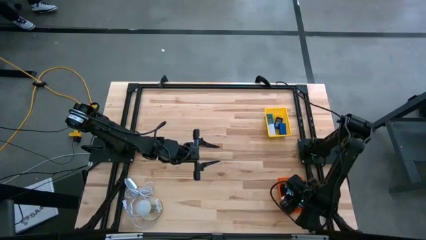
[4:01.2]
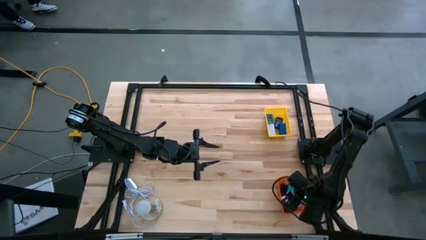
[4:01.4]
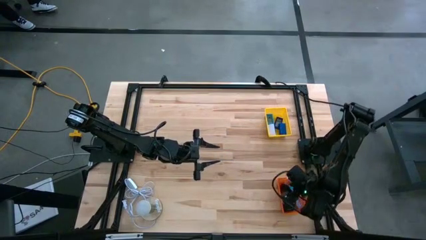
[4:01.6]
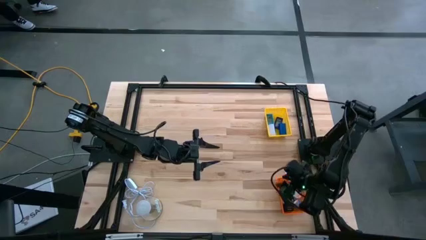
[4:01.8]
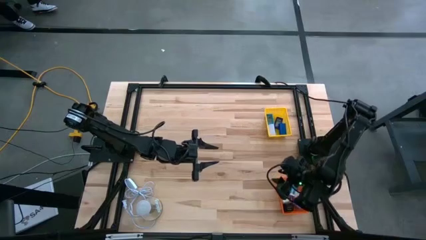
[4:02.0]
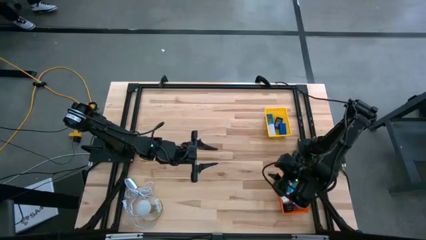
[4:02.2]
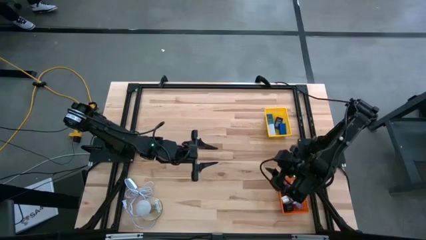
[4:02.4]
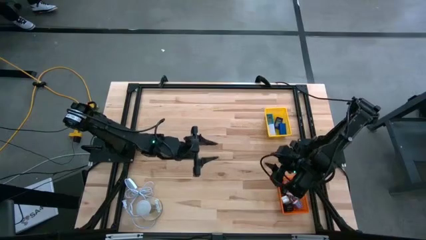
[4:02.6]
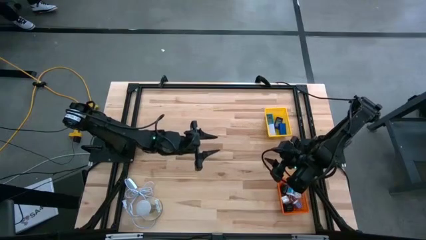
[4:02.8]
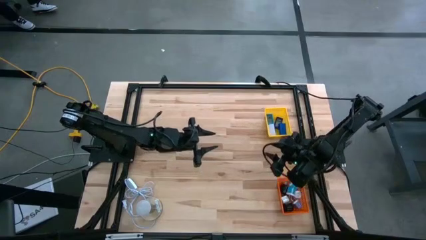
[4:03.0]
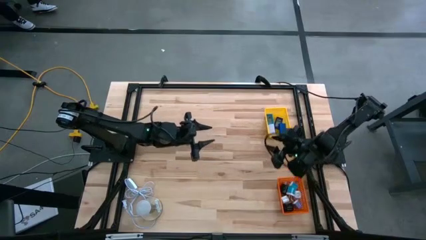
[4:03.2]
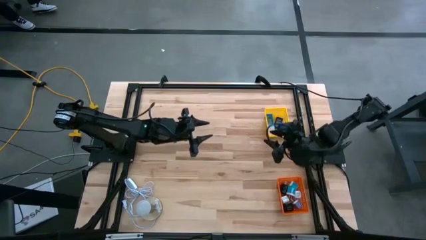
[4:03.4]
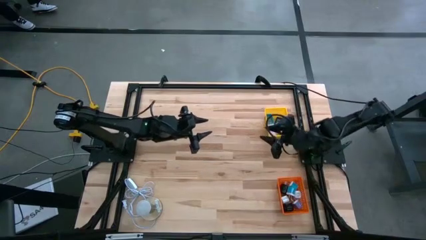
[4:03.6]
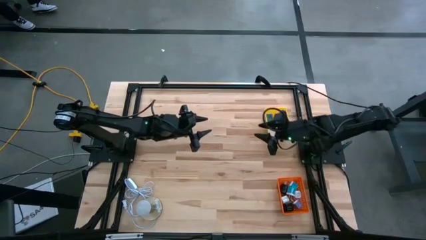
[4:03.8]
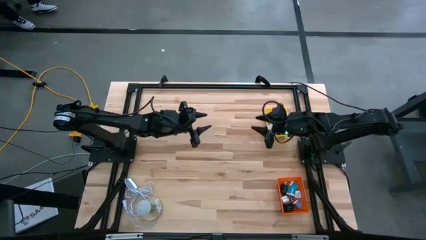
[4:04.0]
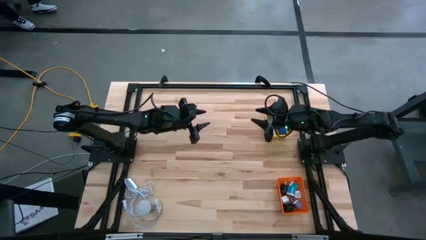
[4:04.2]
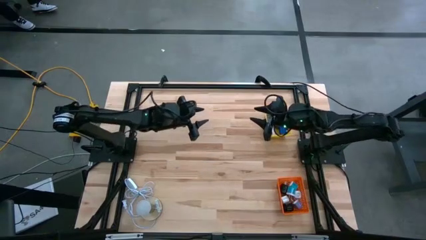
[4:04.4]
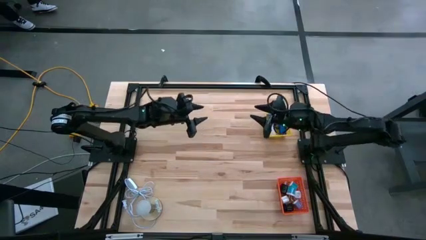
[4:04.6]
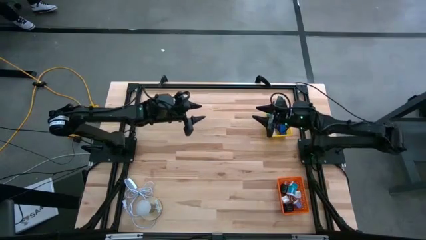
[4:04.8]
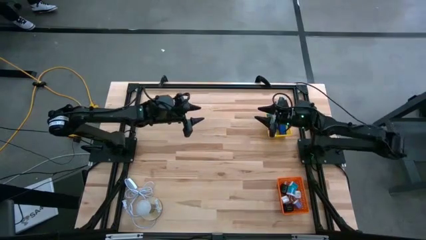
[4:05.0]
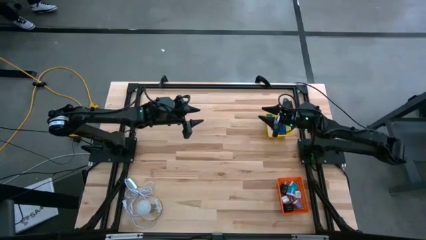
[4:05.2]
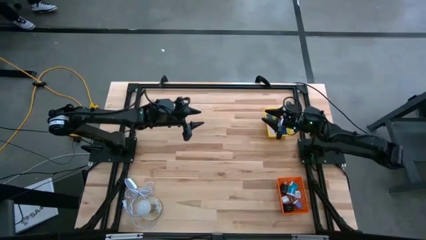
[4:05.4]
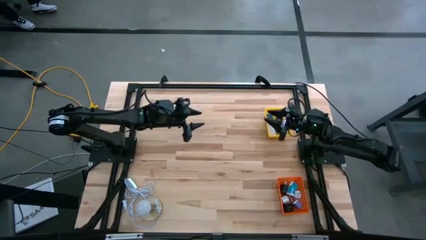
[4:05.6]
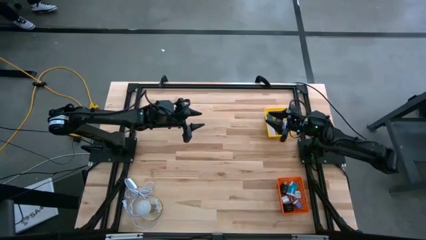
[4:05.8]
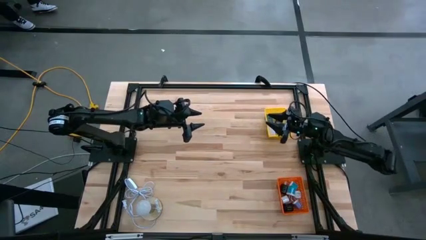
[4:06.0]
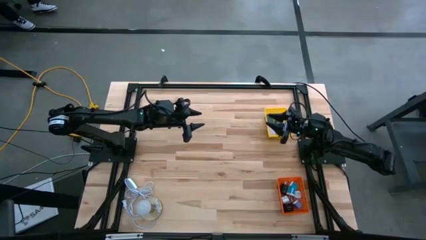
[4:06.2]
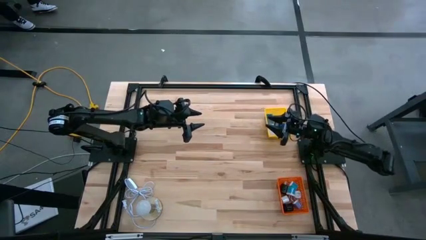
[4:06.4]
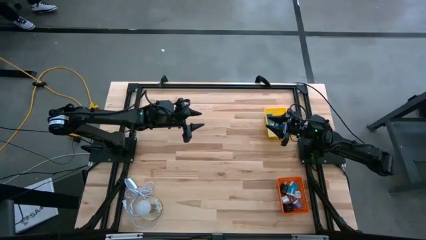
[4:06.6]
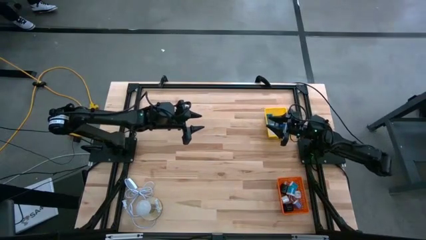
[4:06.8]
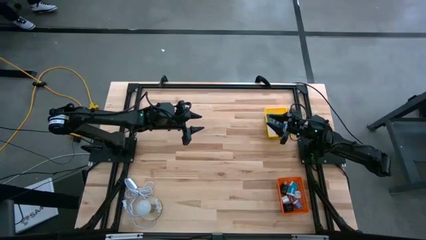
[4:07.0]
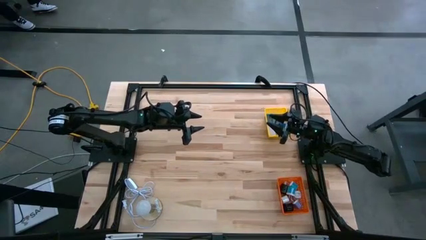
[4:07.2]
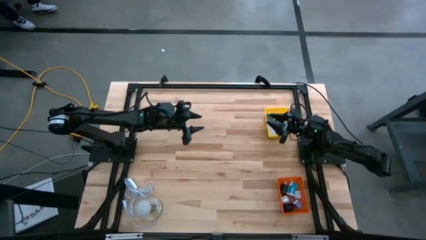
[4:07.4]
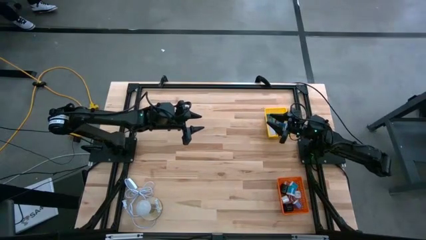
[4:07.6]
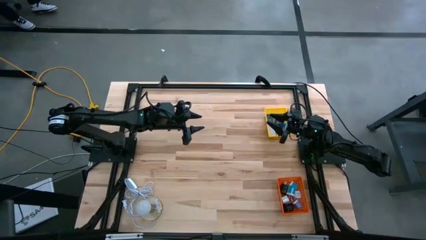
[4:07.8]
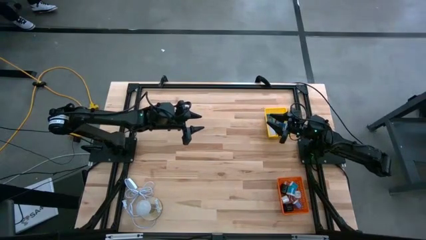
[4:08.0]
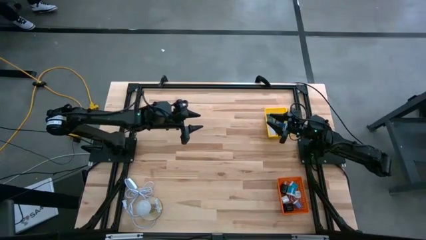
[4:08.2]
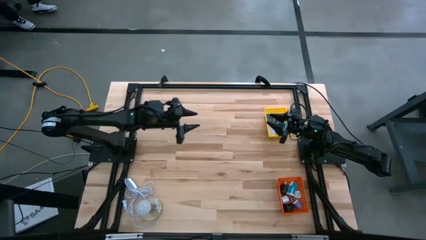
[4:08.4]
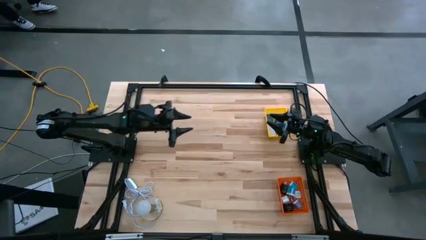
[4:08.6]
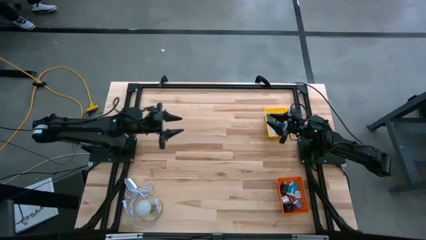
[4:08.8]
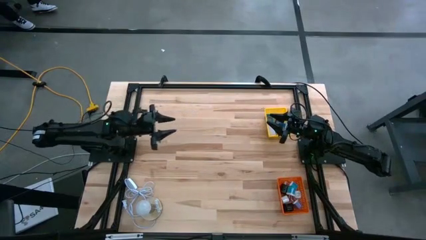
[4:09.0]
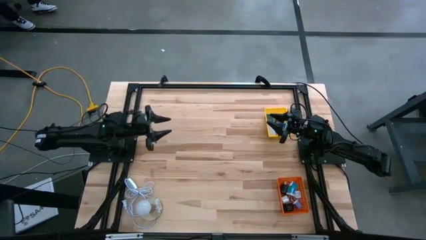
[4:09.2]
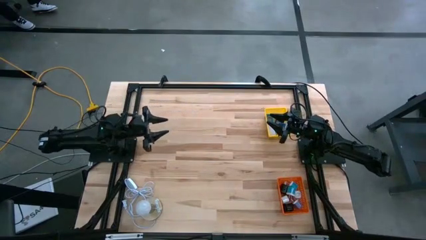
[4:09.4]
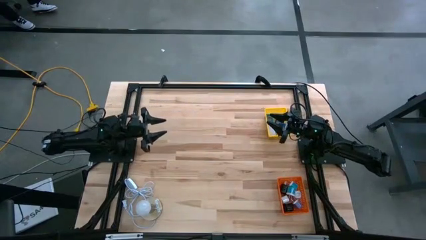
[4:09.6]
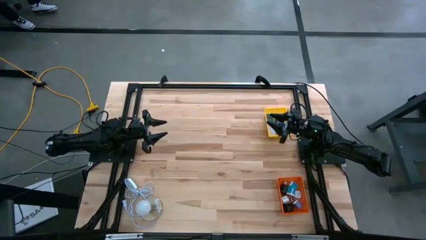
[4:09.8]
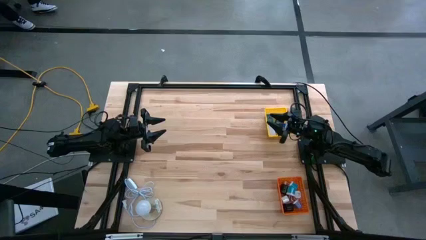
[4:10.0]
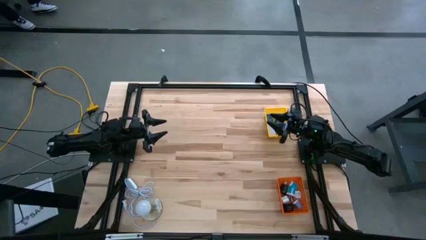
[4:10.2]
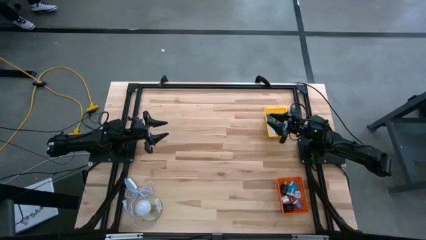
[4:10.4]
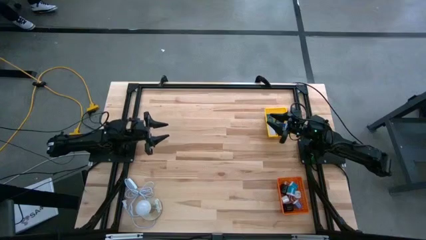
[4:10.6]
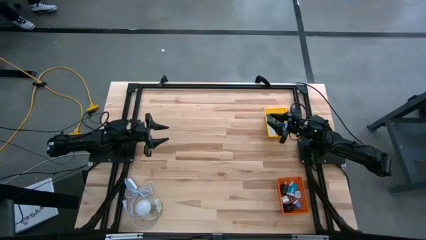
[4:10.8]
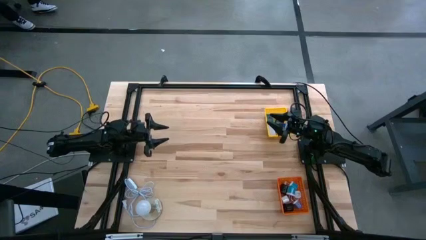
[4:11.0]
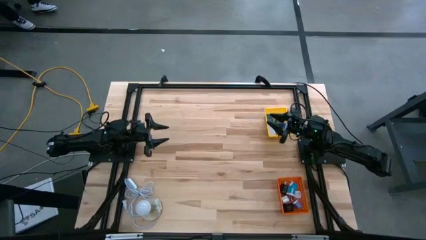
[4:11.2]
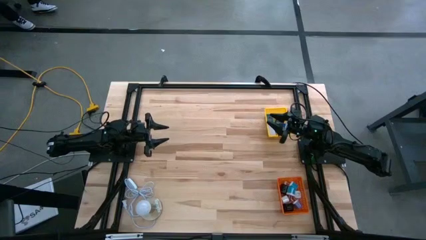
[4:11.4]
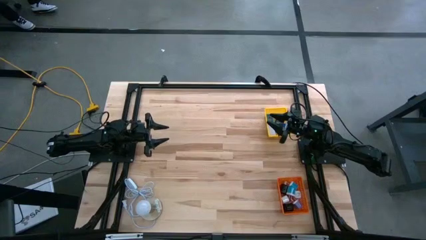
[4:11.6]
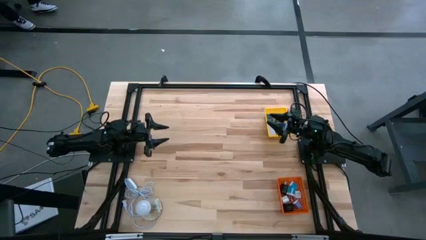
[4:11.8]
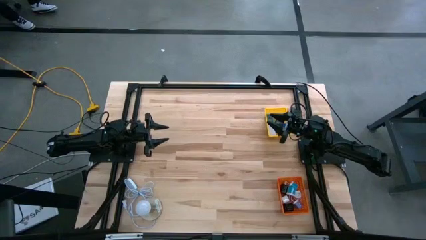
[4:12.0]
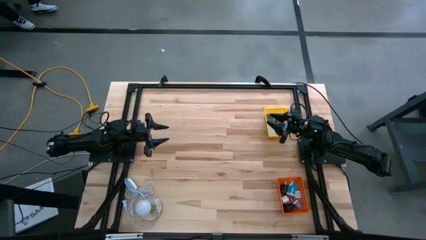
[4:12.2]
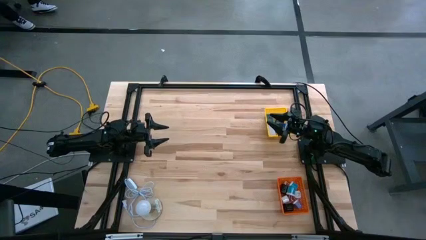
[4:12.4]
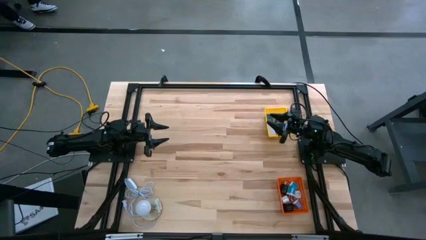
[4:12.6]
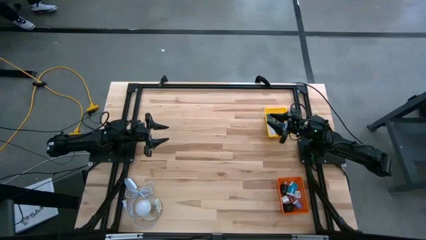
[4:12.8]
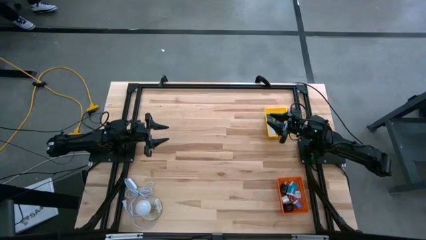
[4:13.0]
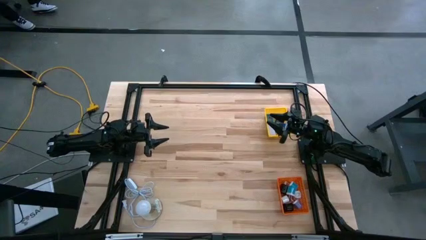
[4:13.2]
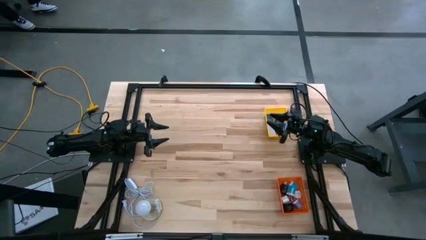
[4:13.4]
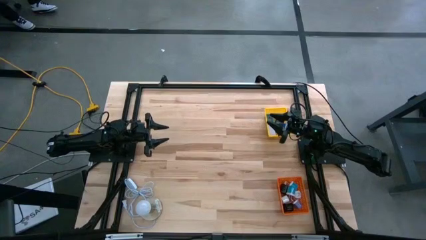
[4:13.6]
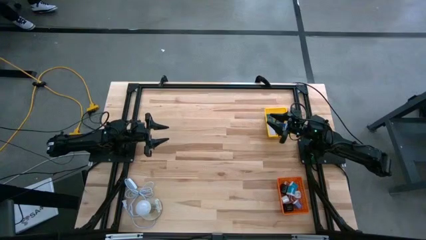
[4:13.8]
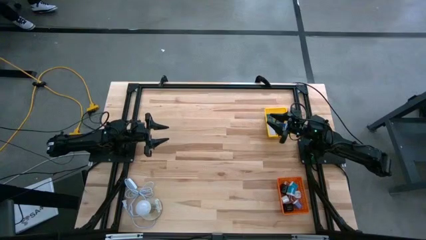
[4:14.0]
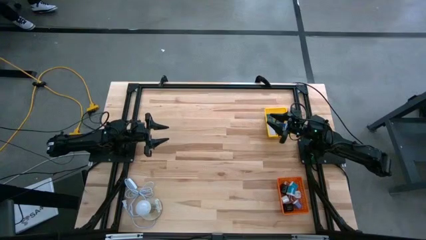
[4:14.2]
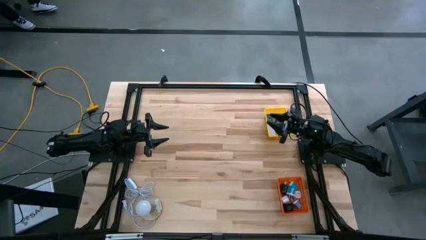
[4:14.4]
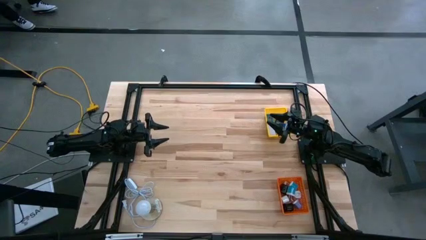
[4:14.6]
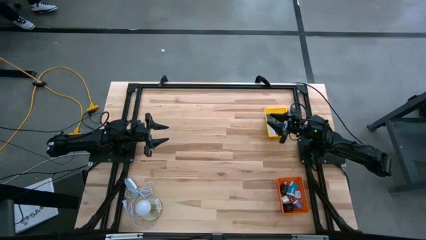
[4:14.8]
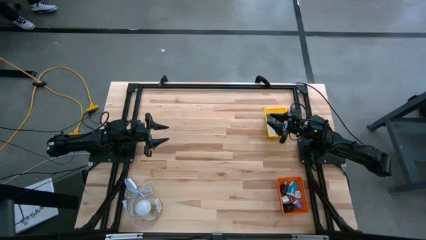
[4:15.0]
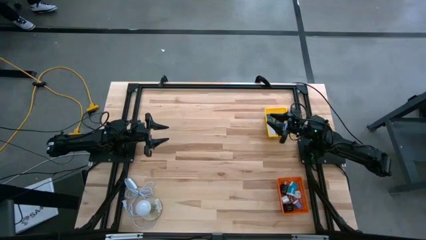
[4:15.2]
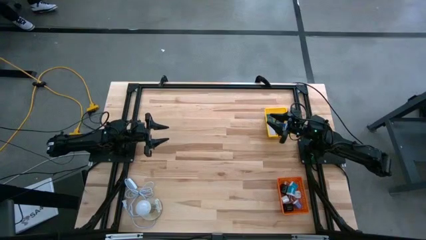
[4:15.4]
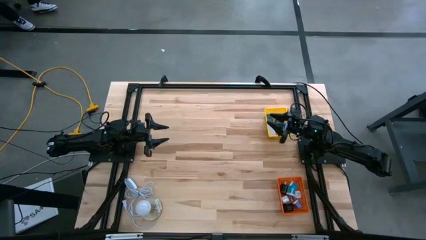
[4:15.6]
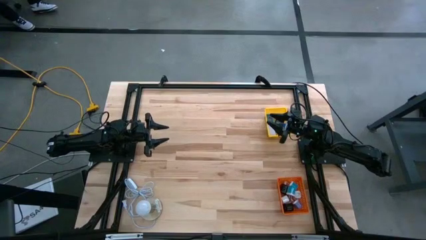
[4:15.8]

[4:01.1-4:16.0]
Task: Pick & Place Office items
Return to Home position

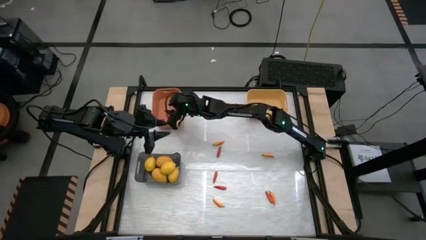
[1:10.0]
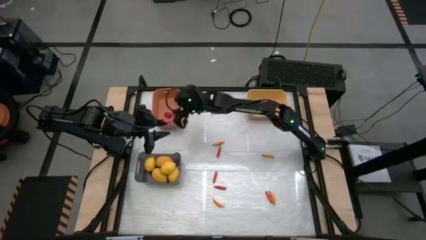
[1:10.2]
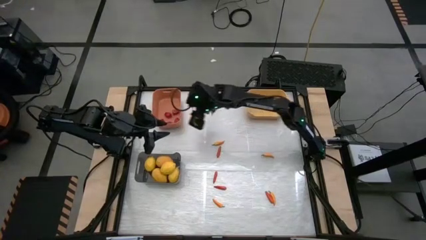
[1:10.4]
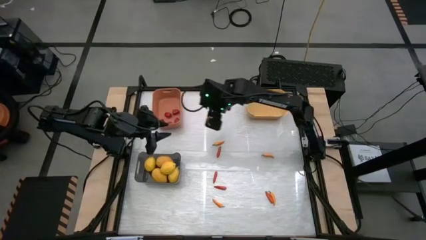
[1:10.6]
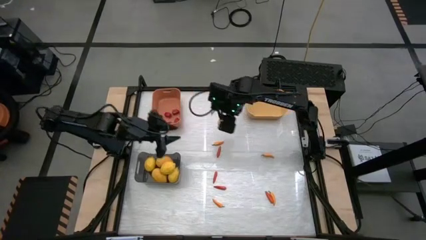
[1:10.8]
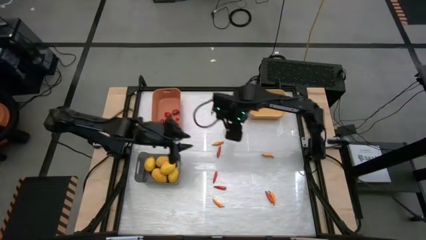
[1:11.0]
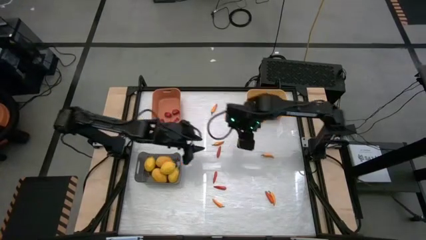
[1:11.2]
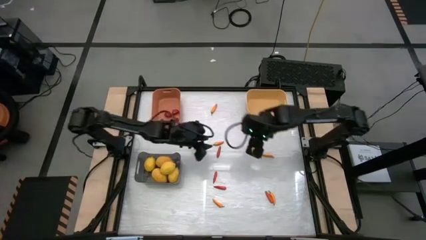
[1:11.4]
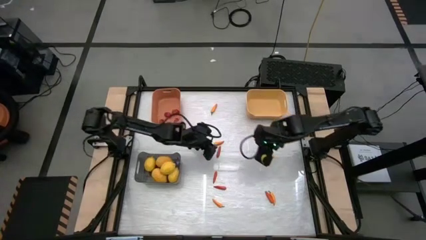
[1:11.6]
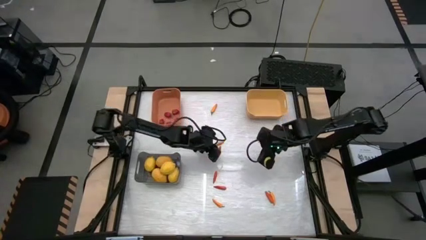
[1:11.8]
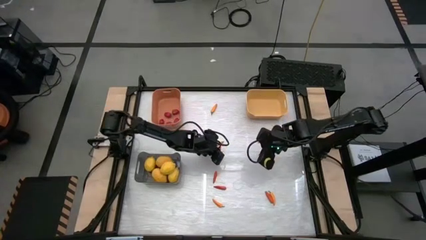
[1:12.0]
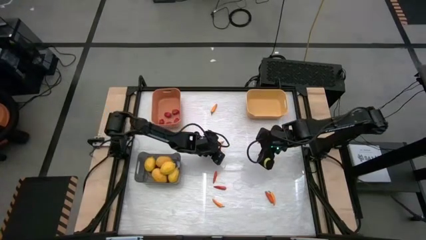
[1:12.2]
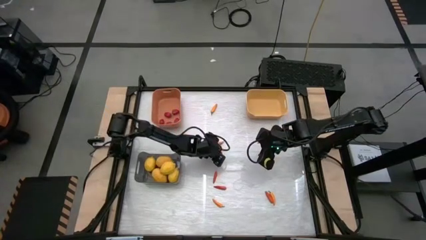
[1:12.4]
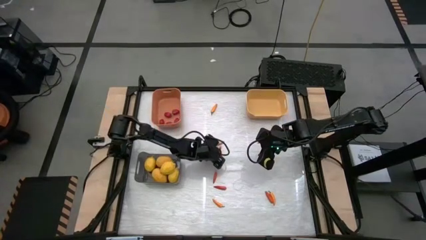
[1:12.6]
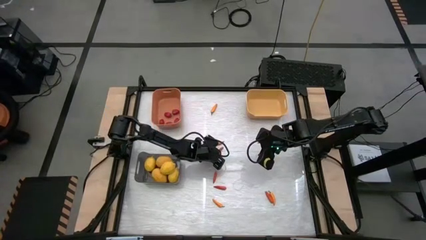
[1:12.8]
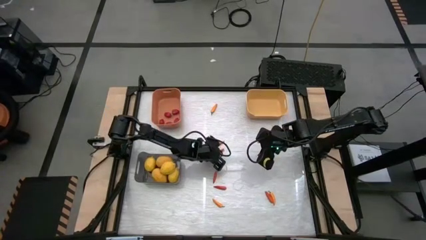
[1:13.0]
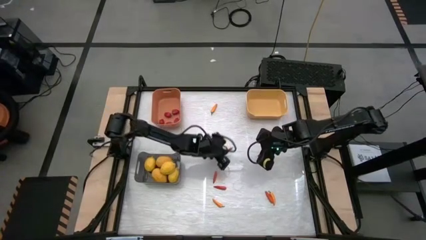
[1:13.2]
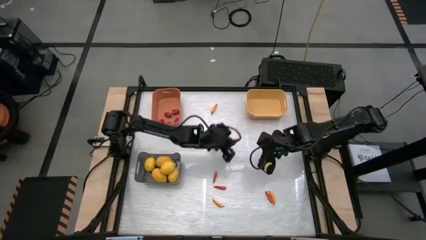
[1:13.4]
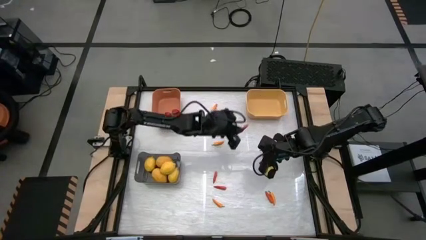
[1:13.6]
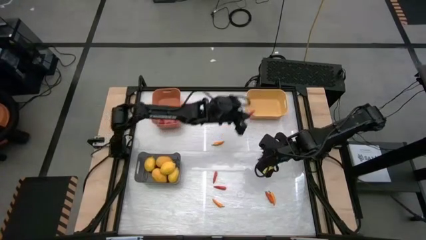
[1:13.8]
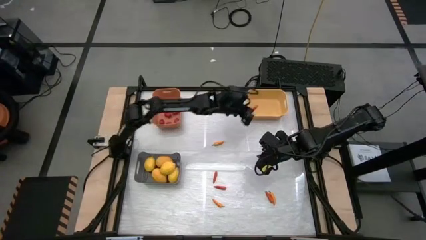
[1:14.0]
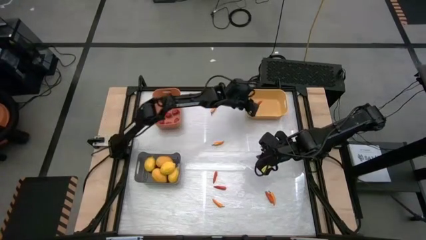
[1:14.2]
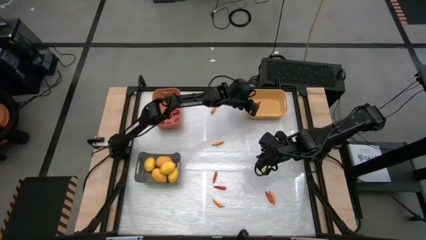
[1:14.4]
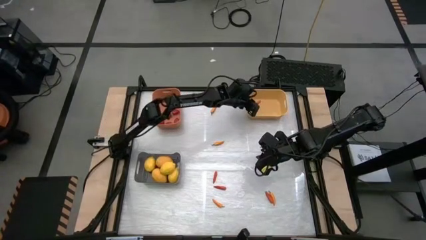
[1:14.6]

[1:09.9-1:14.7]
Task: Sort produce into baskets
Put the orange chili pepper into the yellow bin
